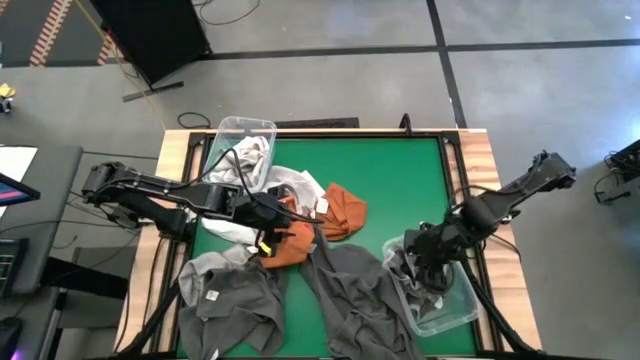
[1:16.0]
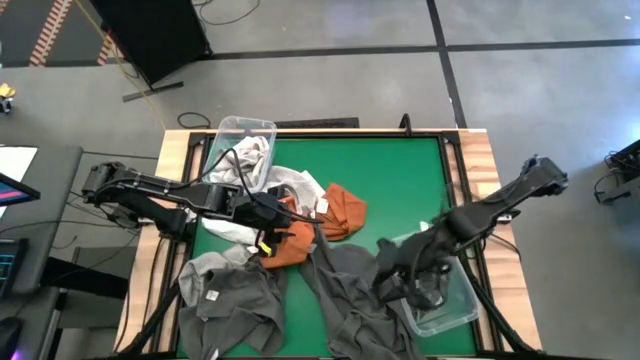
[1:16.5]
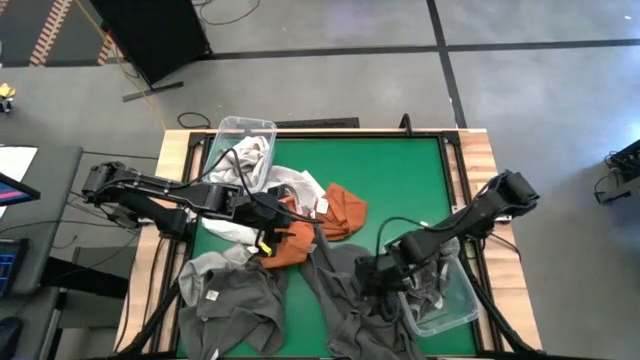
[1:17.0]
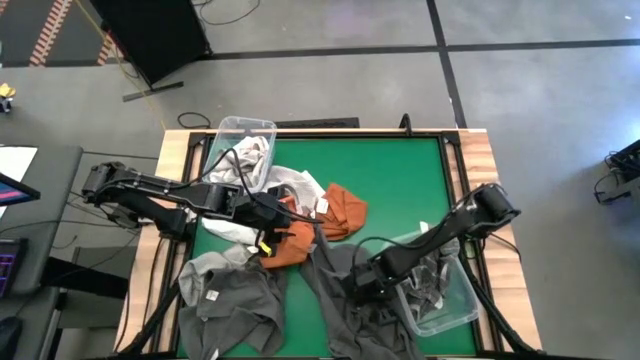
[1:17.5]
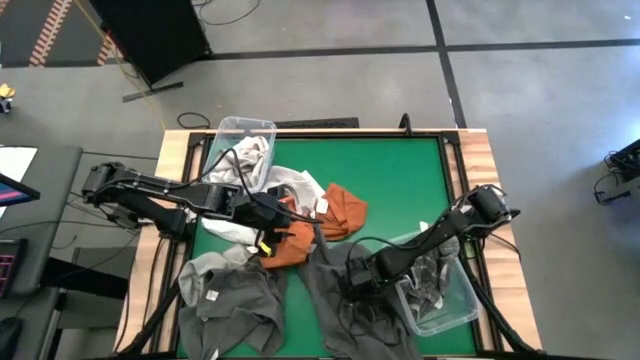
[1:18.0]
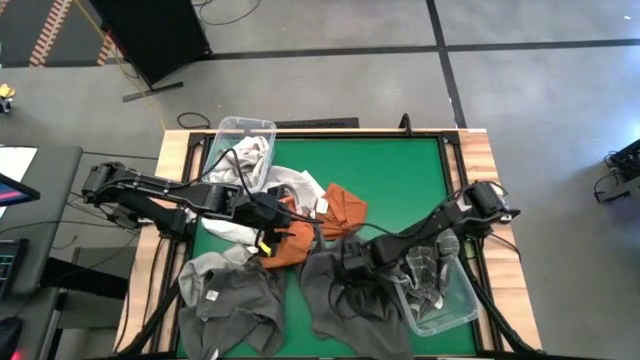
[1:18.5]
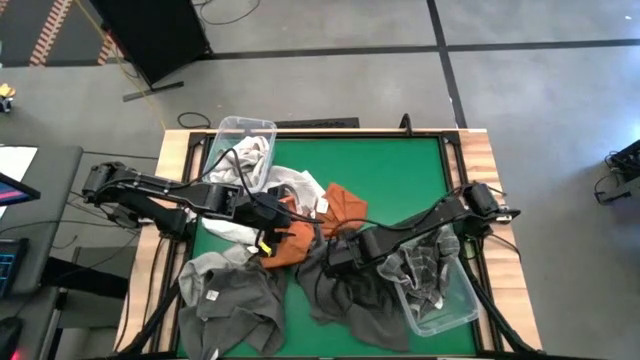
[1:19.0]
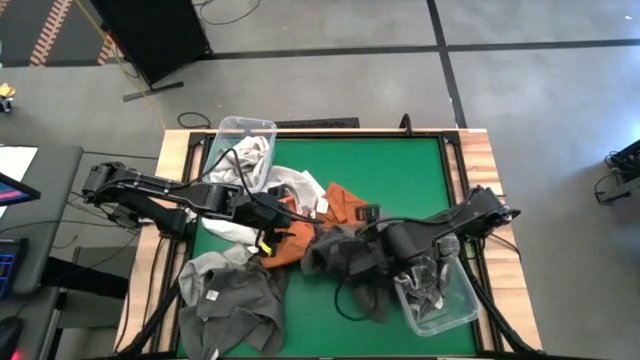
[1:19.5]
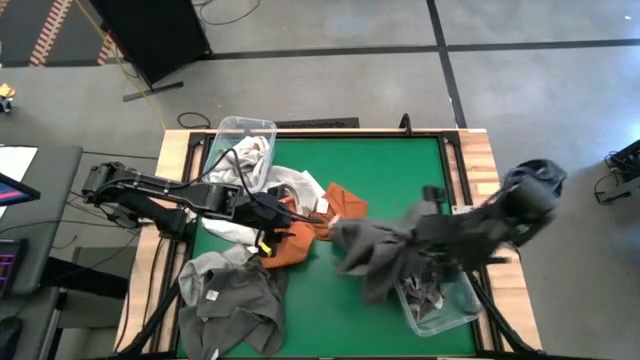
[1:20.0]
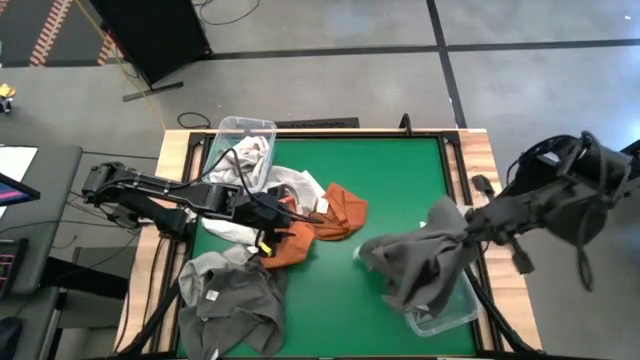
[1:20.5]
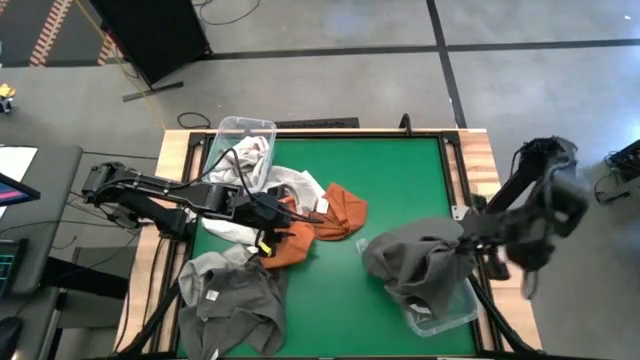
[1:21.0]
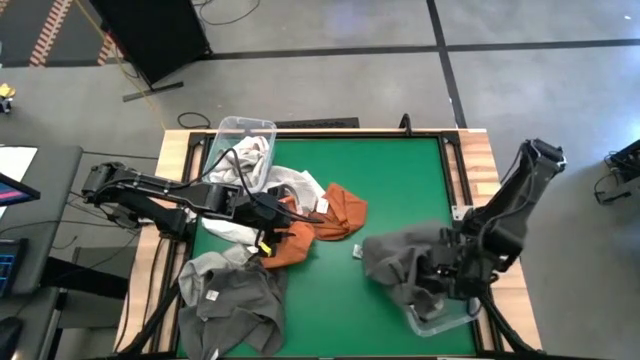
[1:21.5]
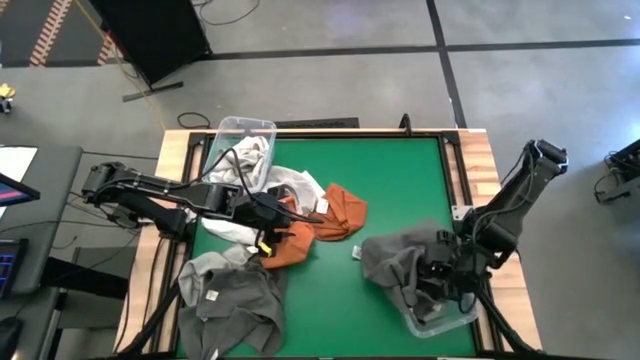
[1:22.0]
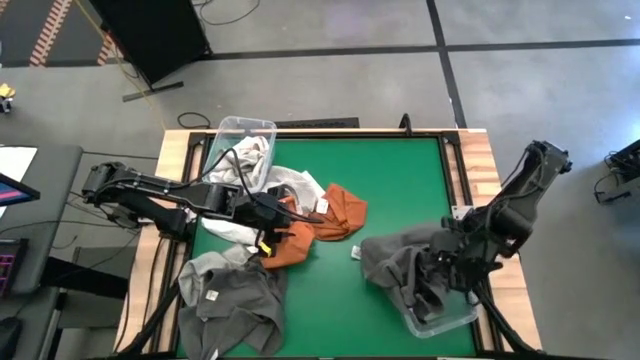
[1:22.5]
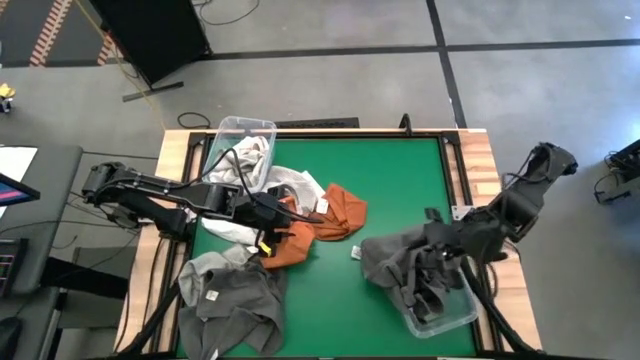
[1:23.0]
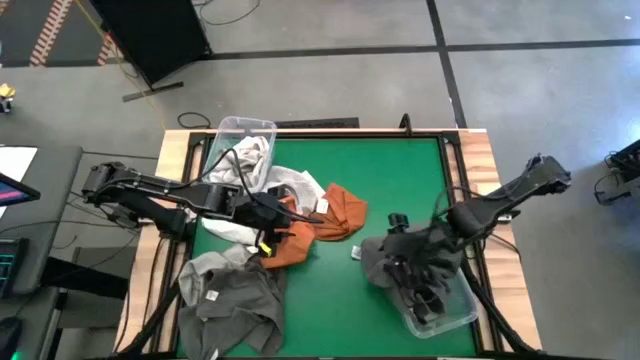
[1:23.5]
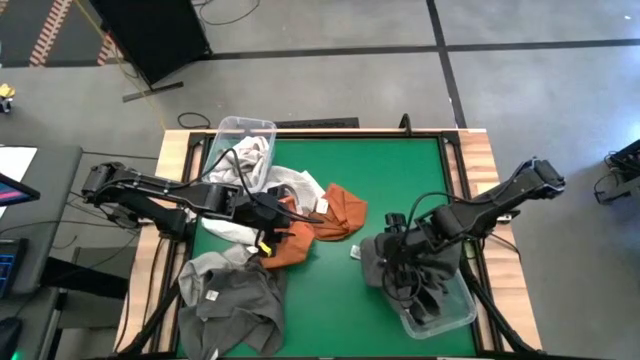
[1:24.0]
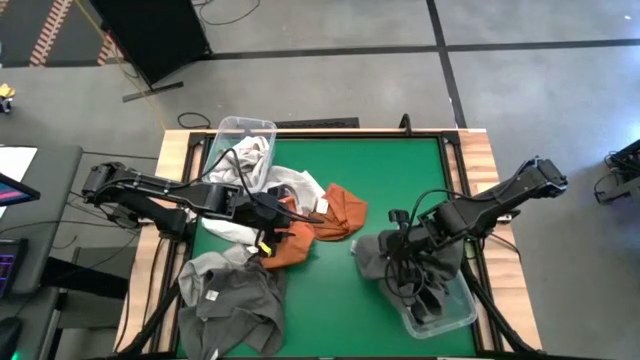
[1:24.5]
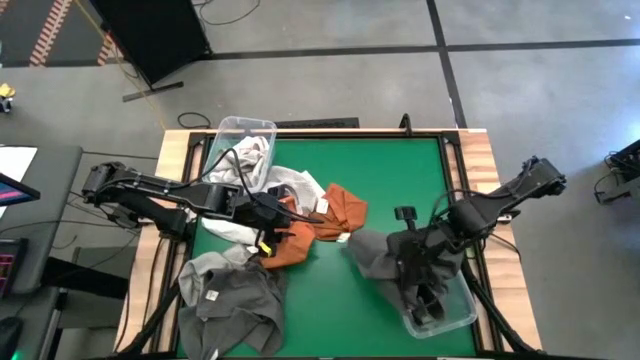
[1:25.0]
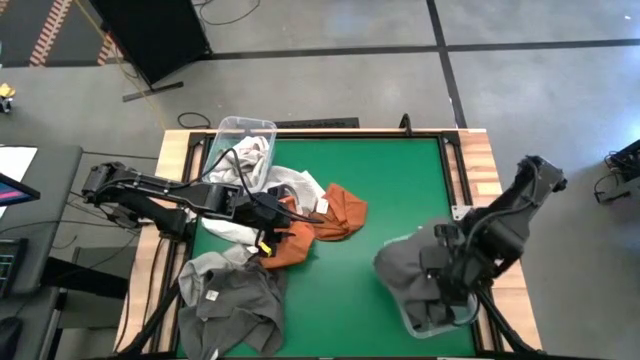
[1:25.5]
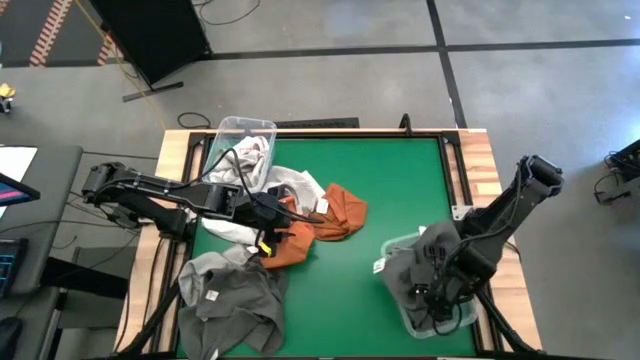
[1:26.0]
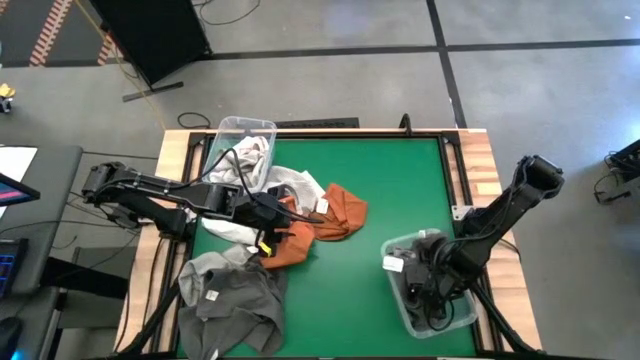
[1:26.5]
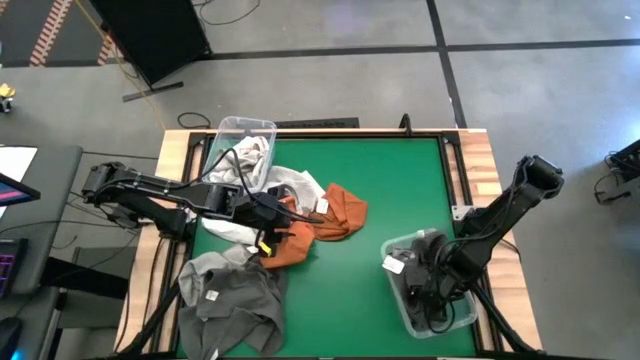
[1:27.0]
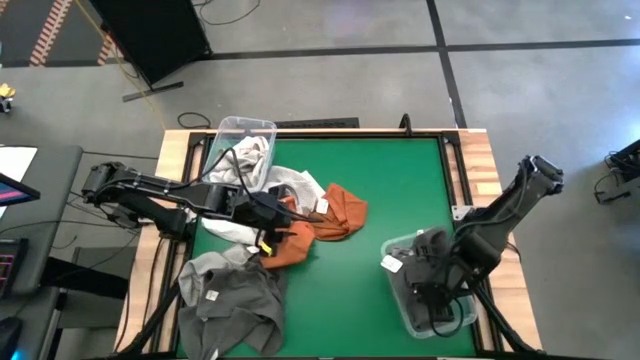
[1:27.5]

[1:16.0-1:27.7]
Task: Sort towels by color in basket
Put the right gray towel into the bottom transparent bin

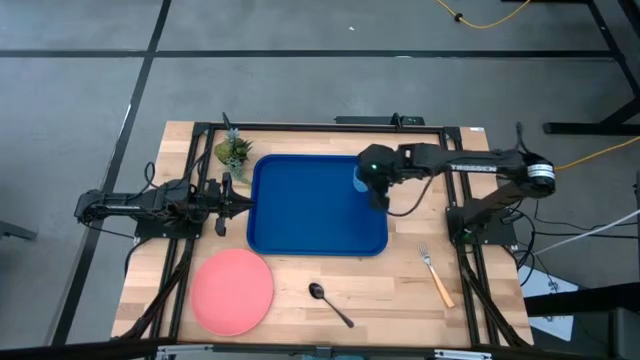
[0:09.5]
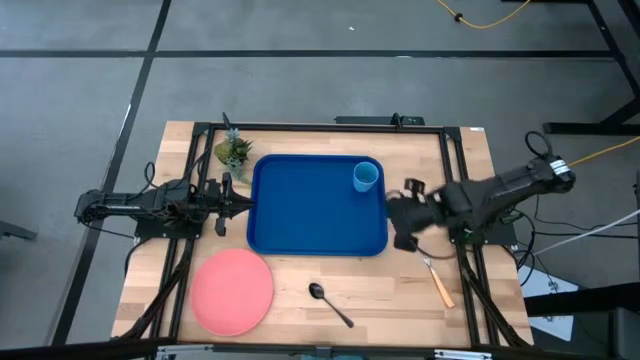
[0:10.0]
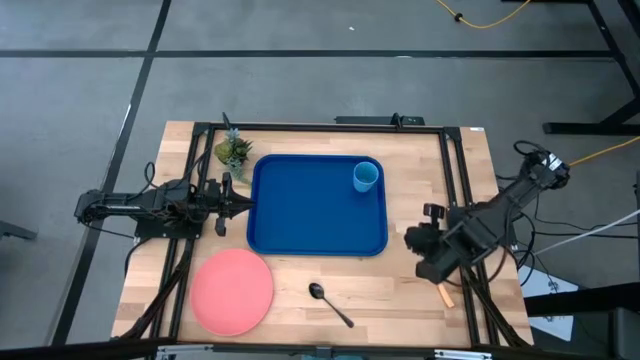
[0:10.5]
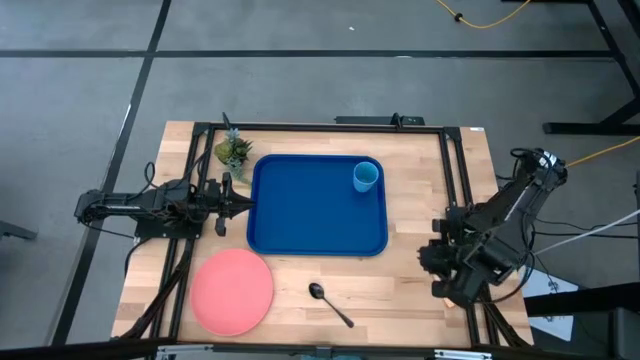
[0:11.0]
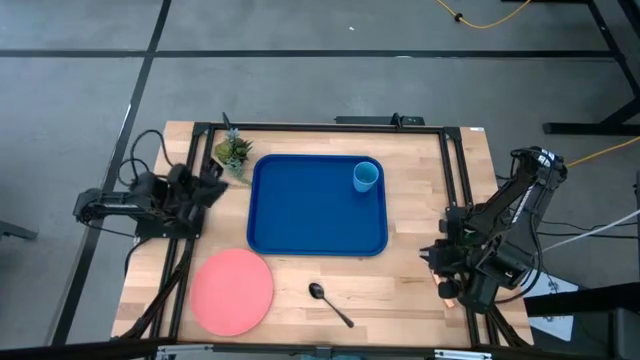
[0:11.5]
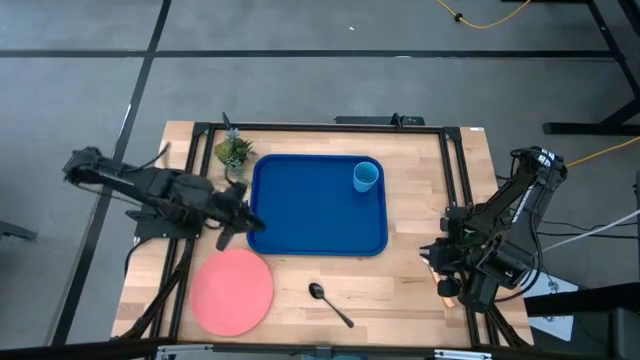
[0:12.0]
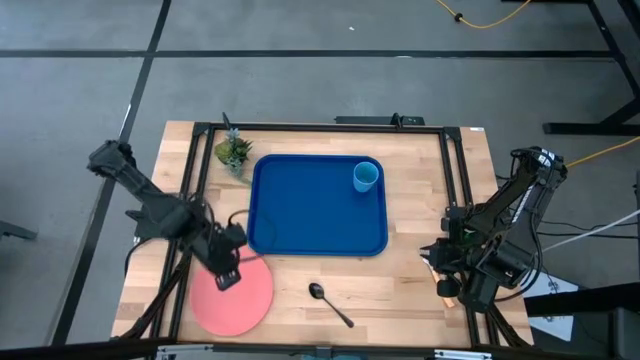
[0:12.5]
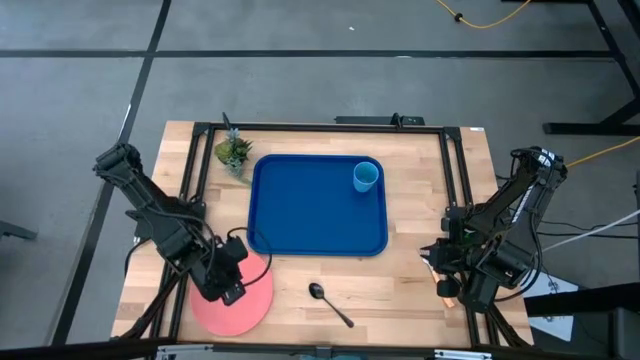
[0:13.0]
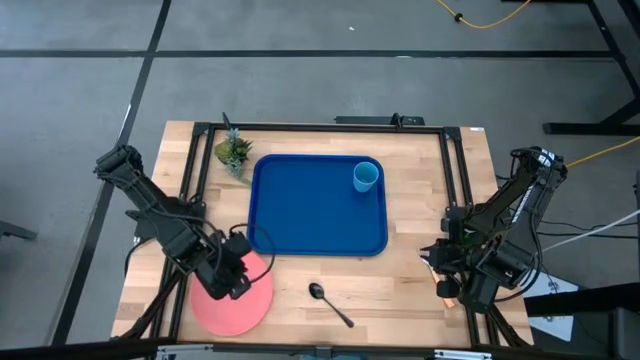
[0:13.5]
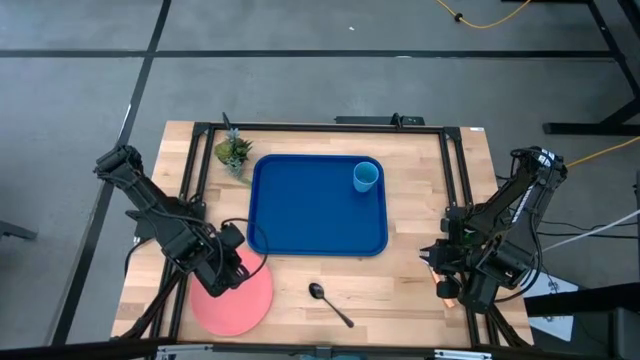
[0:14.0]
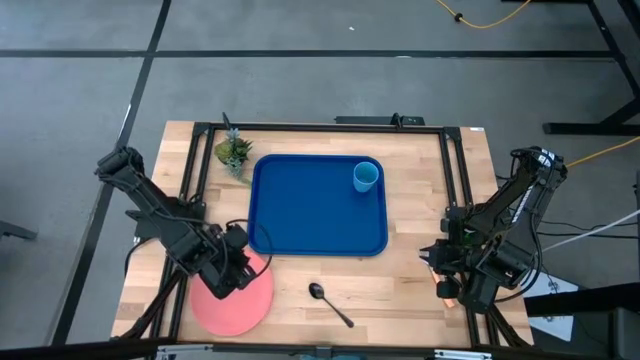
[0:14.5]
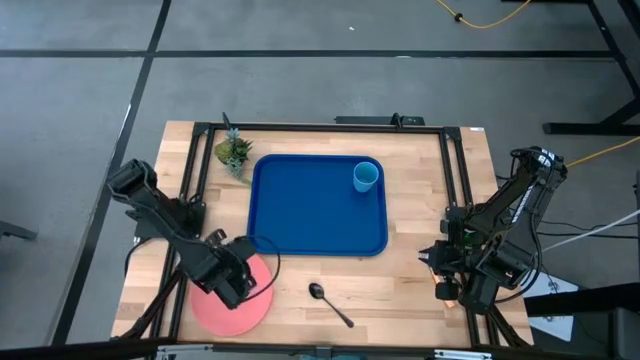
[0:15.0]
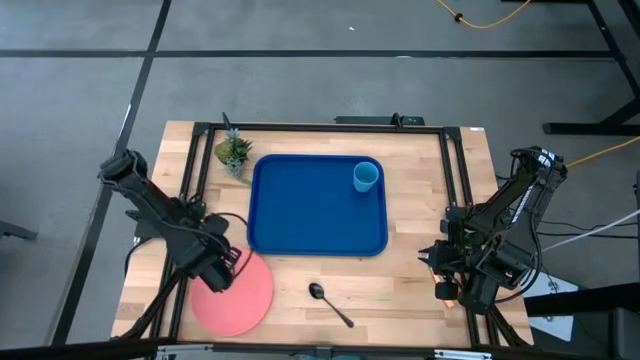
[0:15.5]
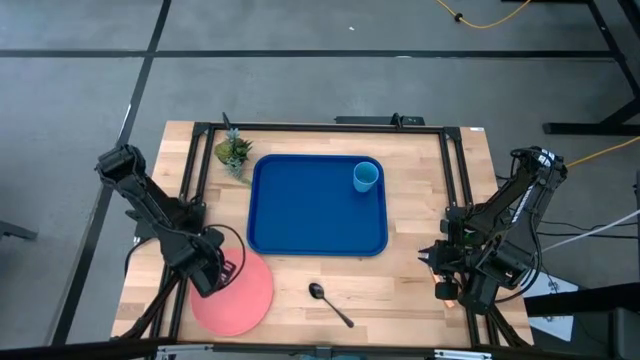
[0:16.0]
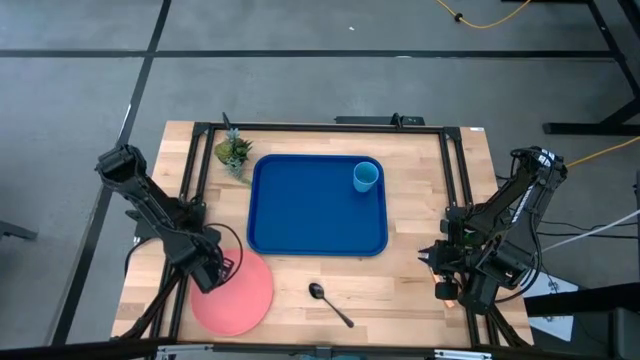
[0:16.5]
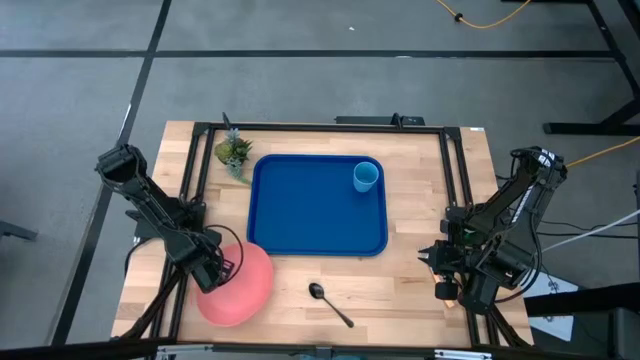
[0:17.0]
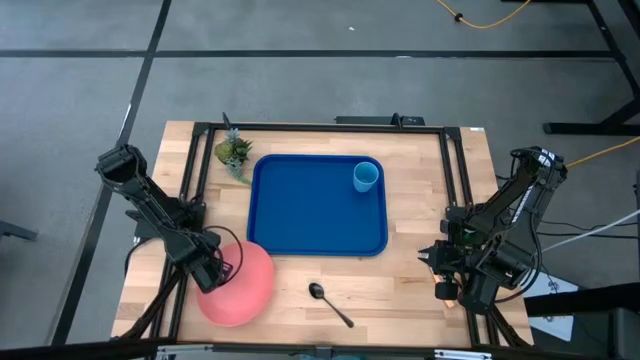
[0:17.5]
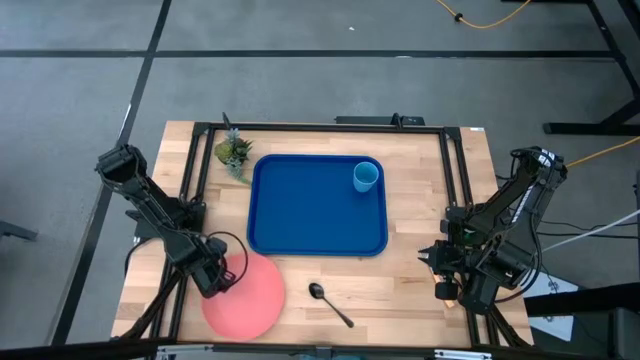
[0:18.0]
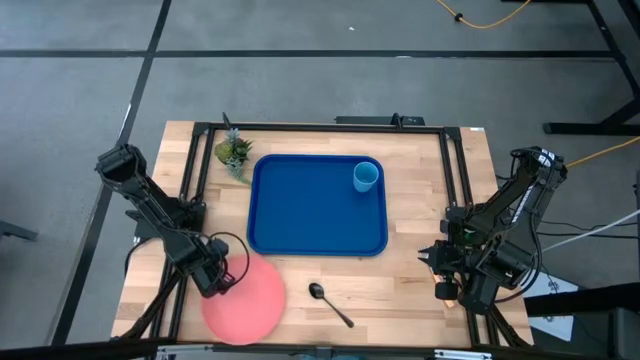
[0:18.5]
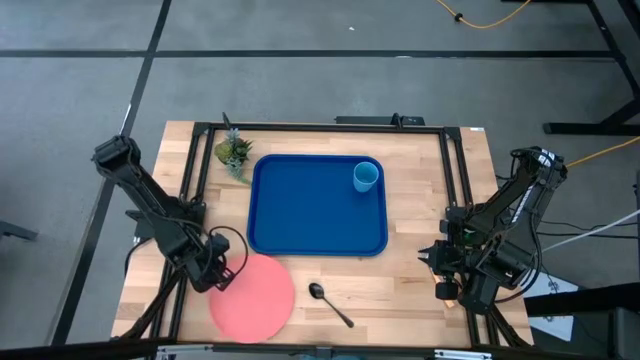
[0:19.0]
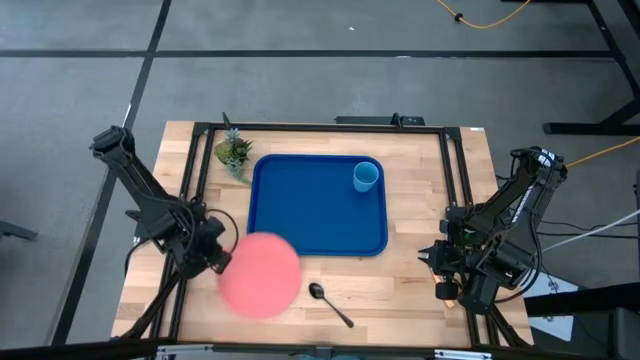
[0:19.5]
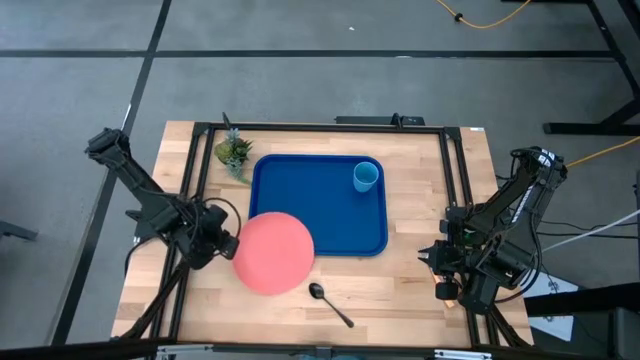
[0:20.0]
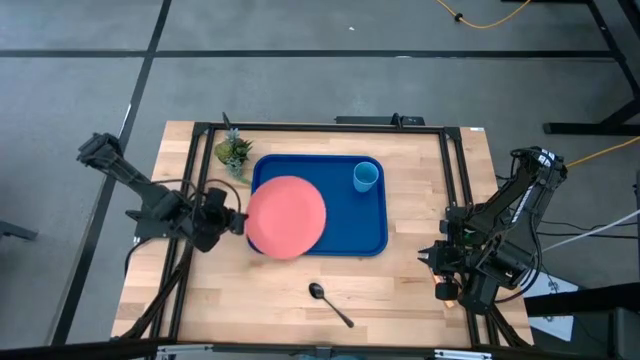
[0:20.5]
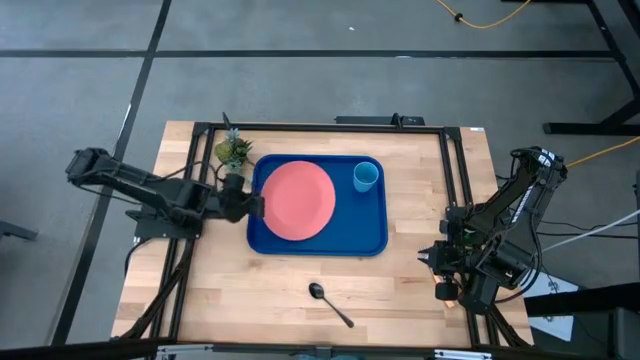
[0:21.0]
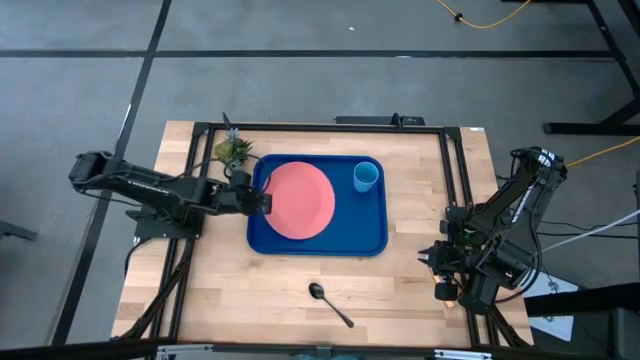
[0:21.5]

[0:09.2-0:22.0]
Task: Pick and place plate/cup/fork/spoon on tray
Put the pink plate on the blue tray
